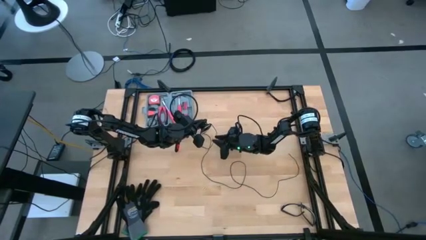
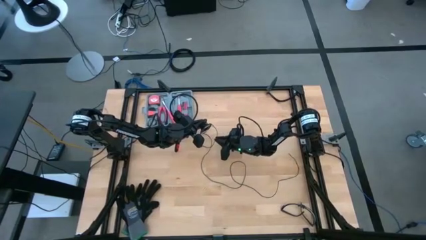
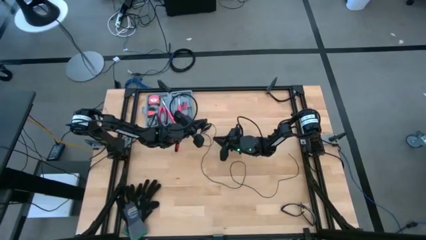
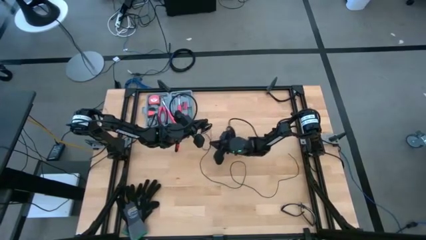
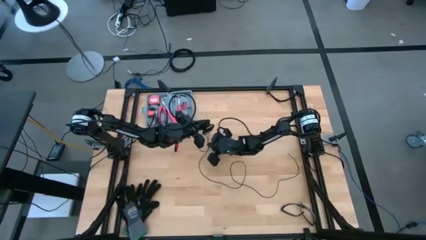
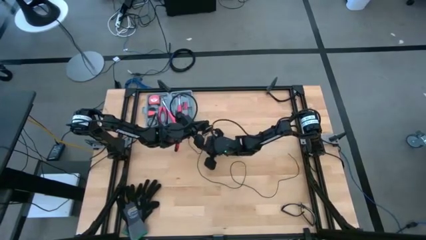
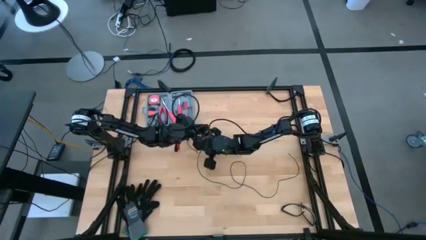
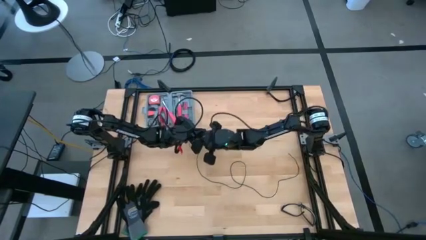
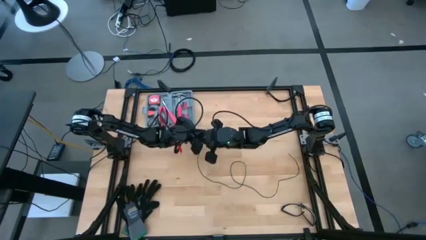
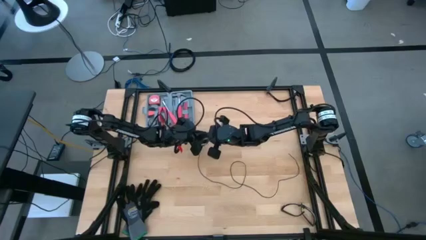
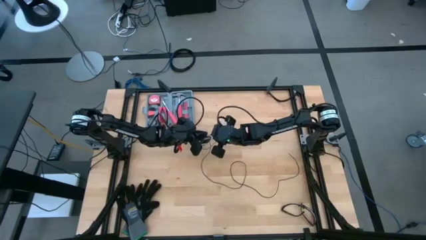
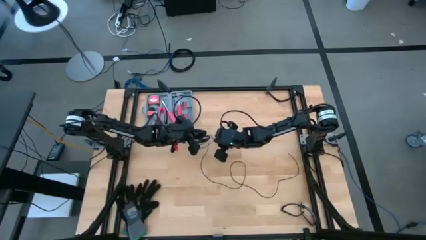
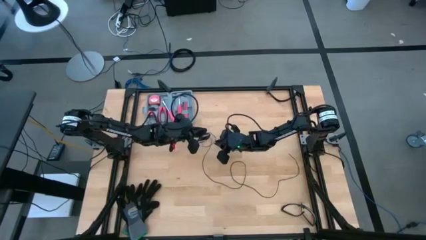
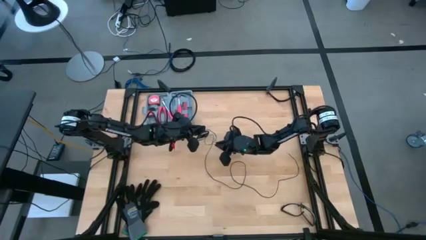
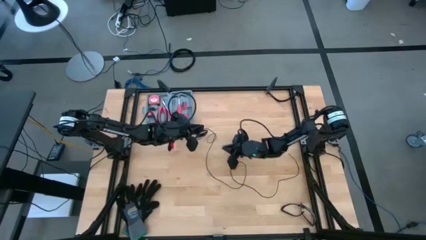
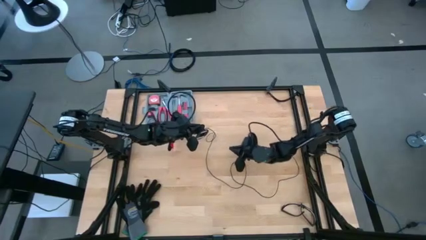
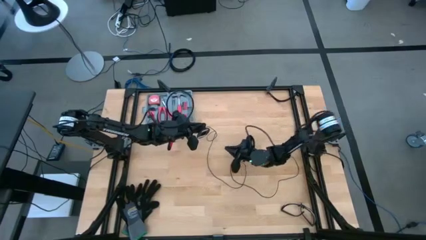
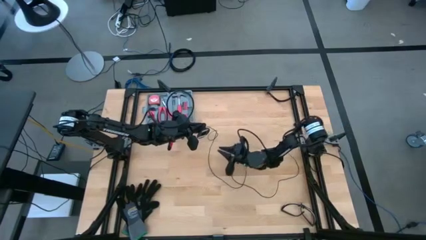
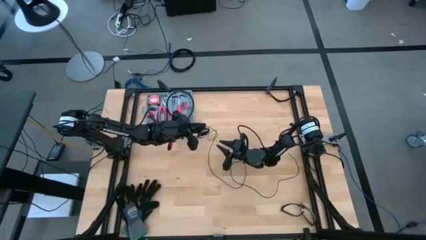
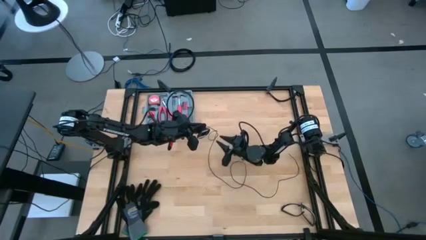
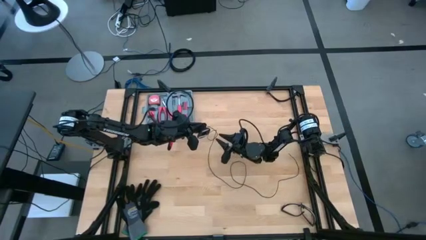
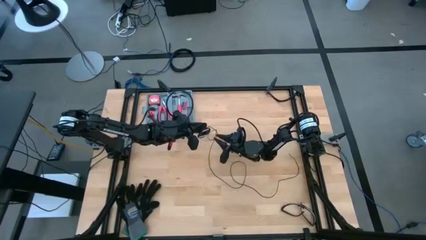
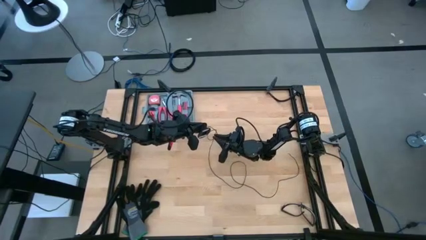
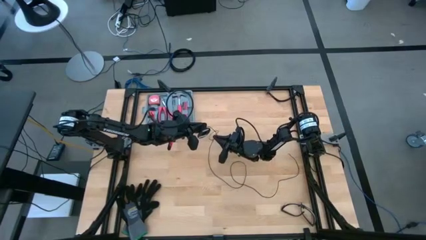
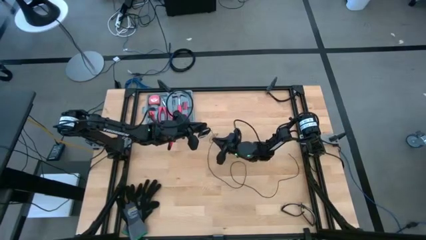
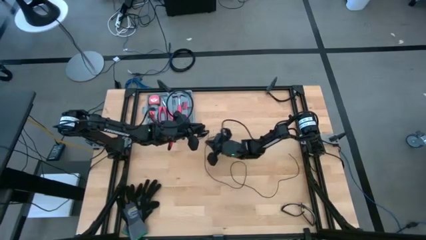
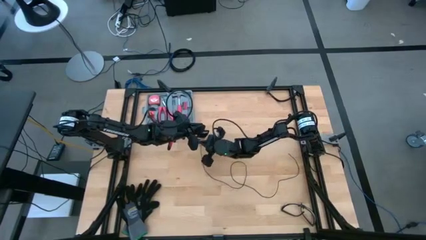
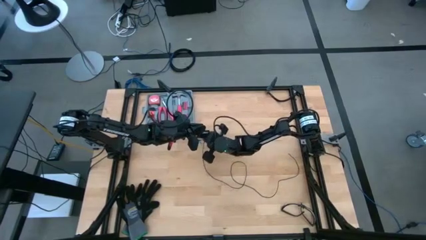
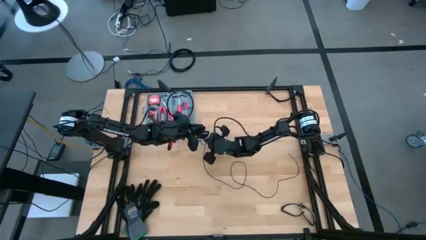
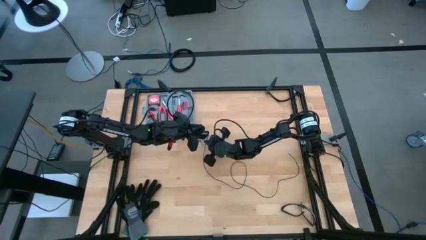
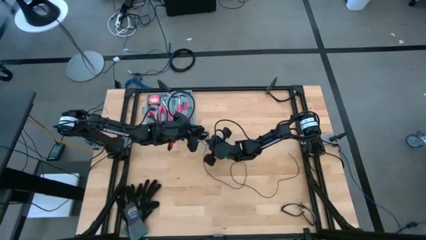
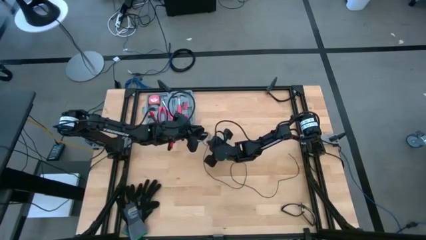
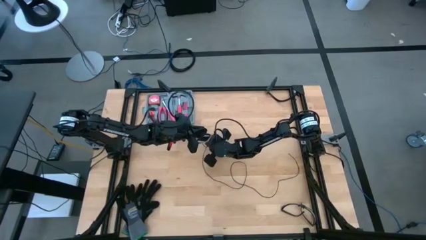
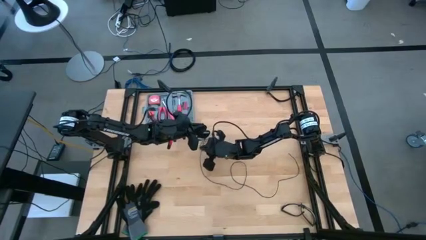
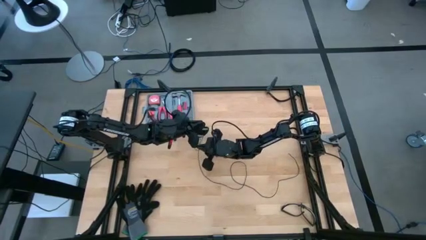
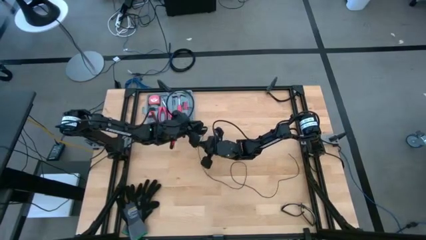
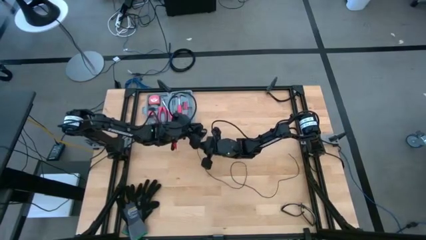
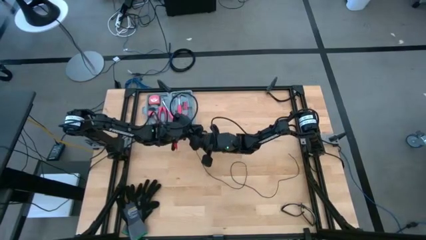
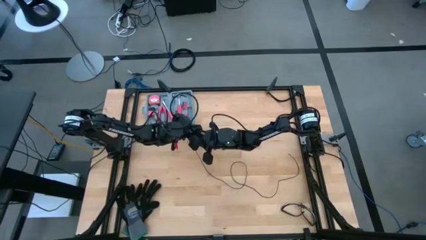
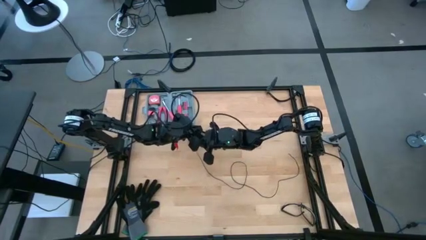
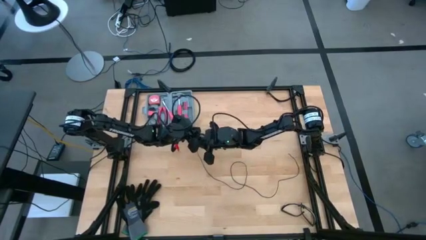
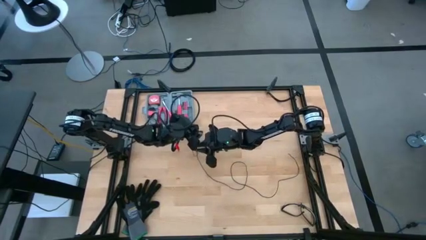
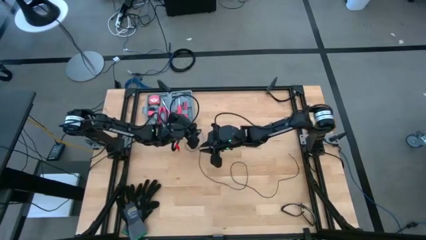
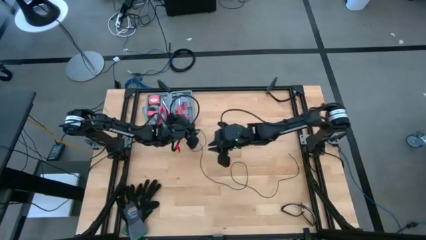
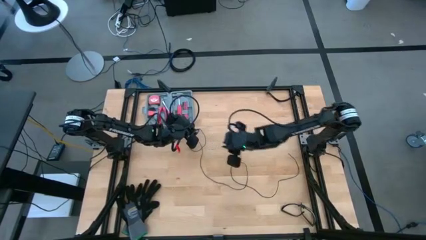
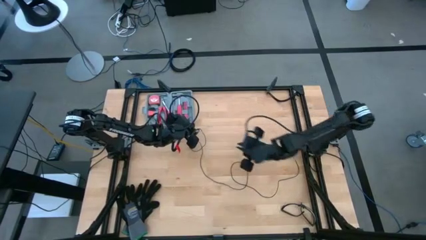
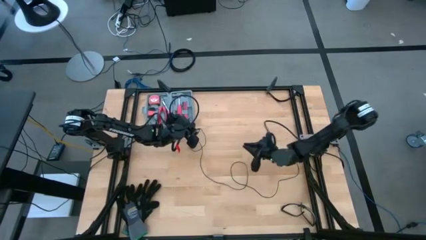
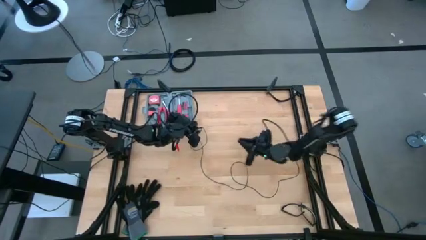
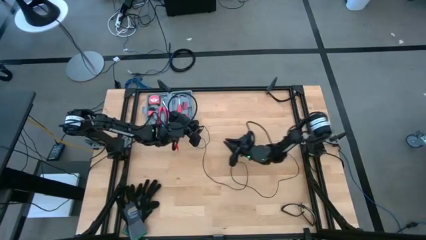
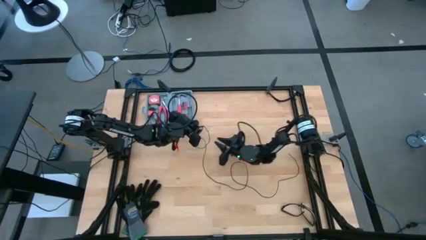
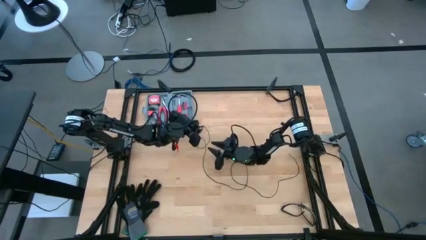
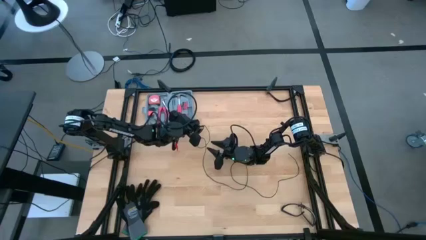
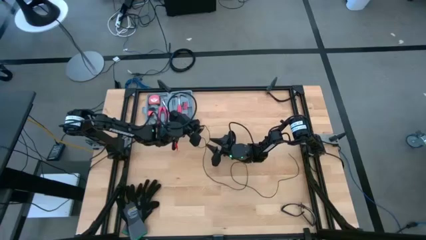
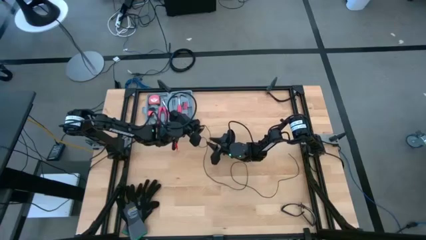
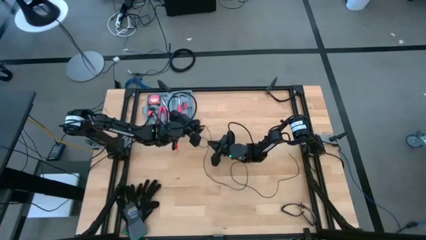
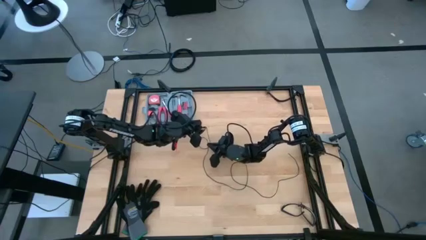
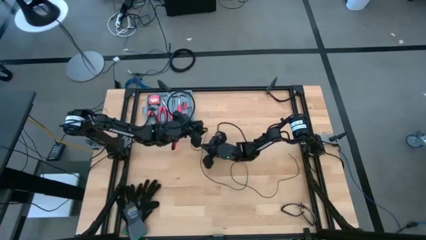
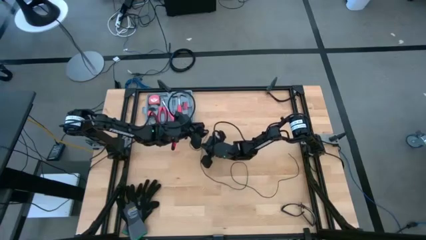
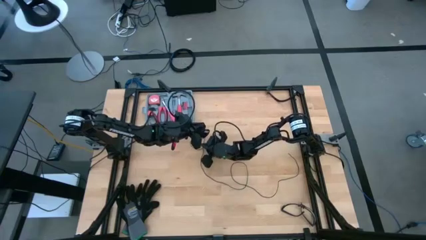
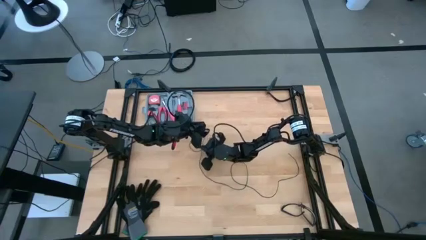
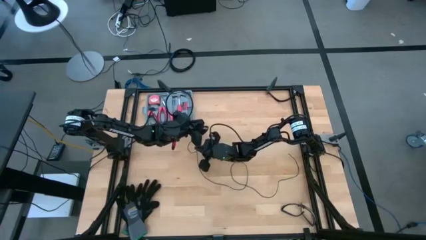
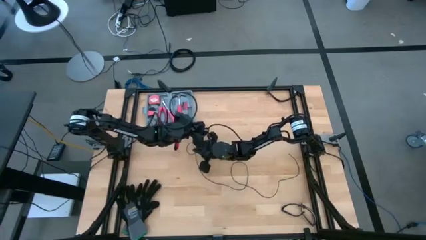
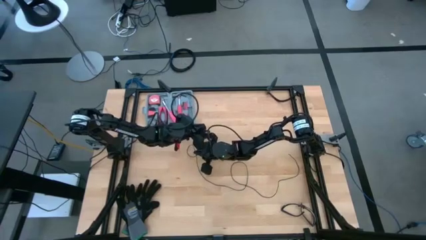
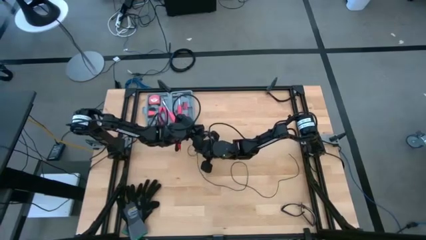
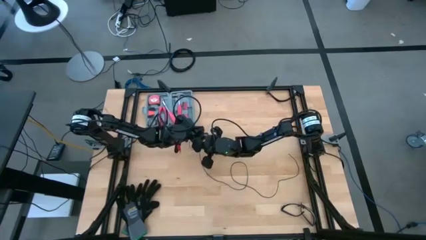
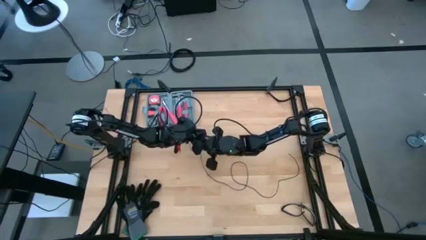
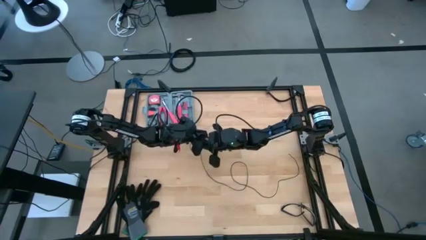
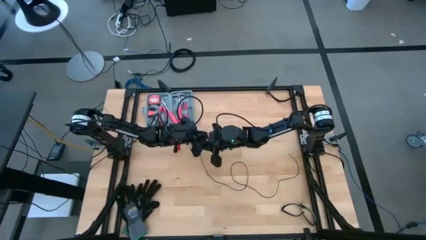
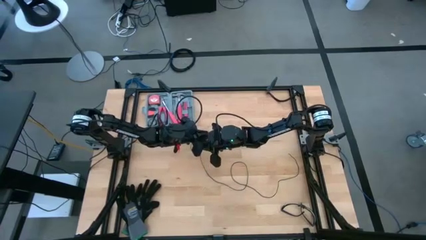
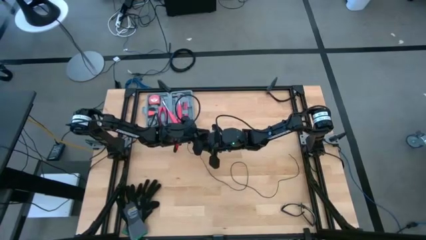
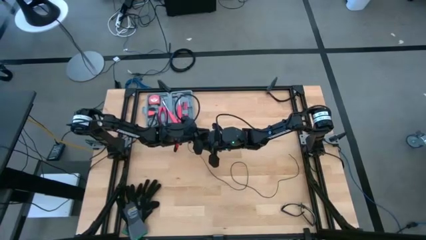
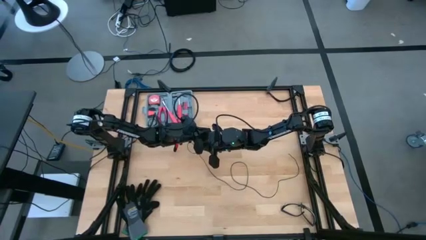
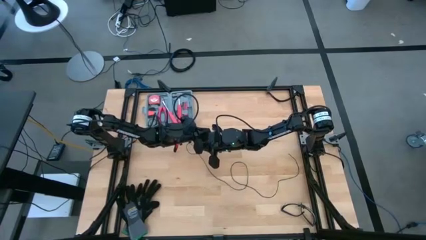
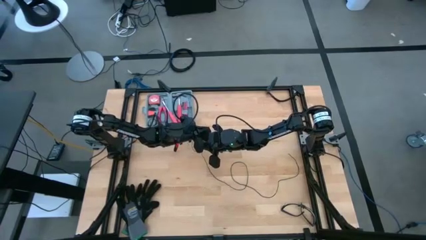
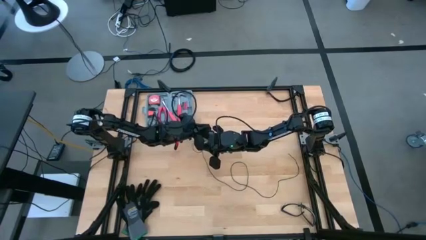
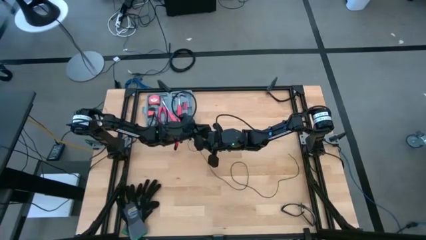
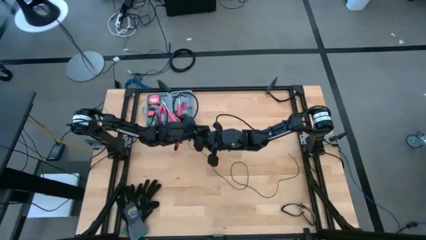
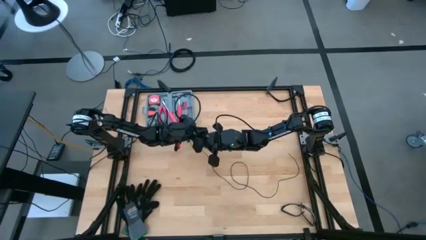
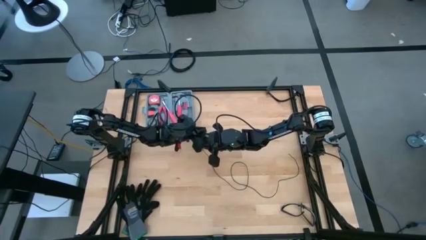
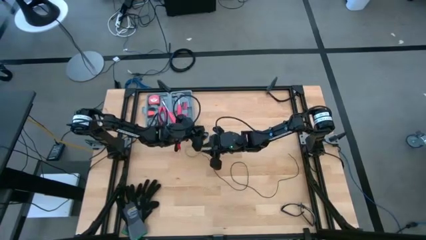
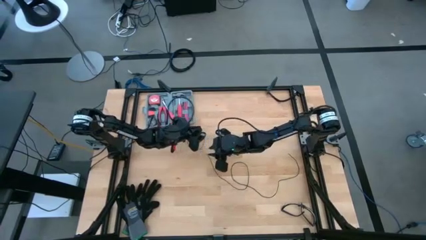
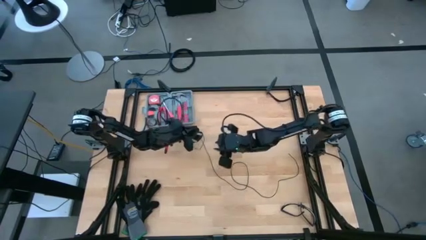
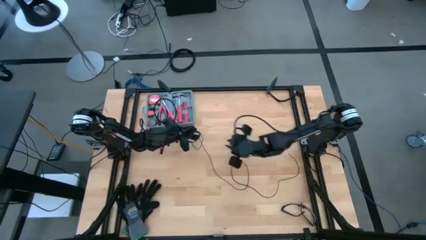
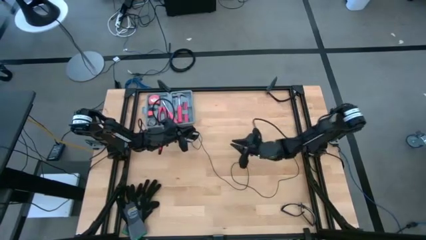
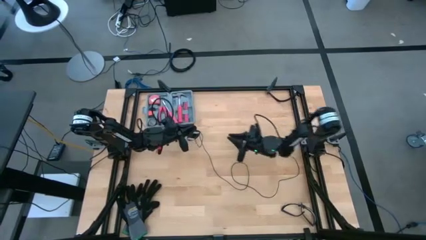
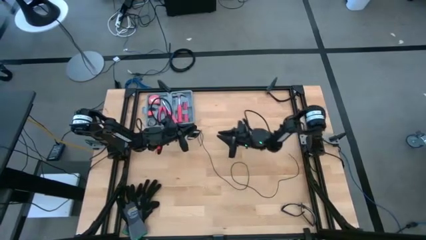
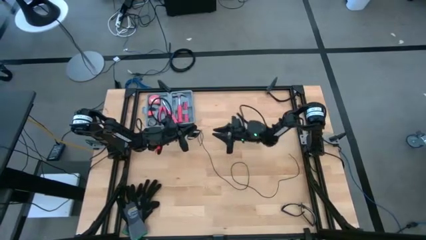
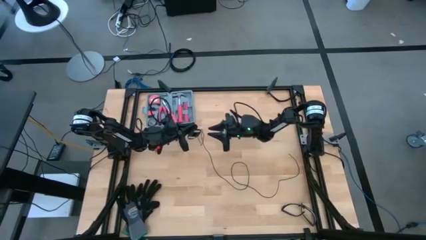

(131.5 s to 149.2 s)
Task: Coil cords
Coil the black wire onto the spool
